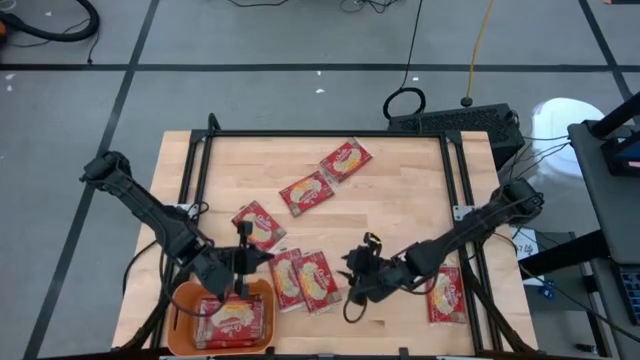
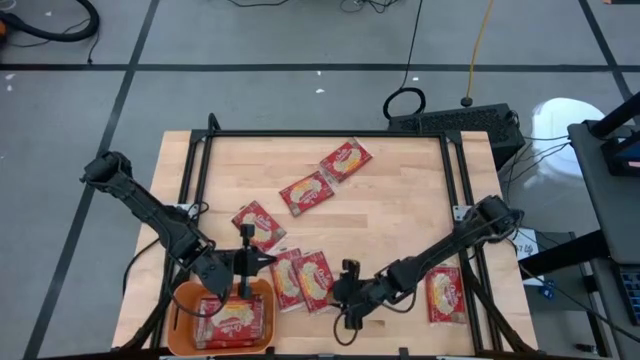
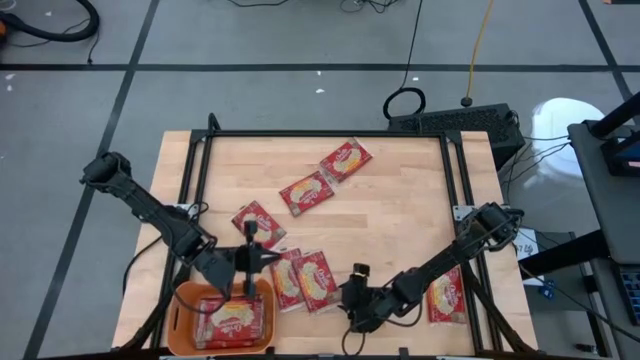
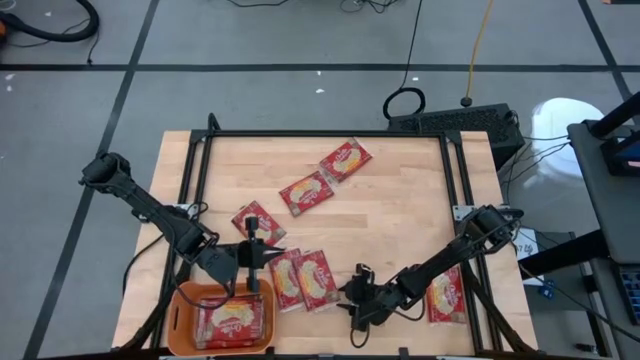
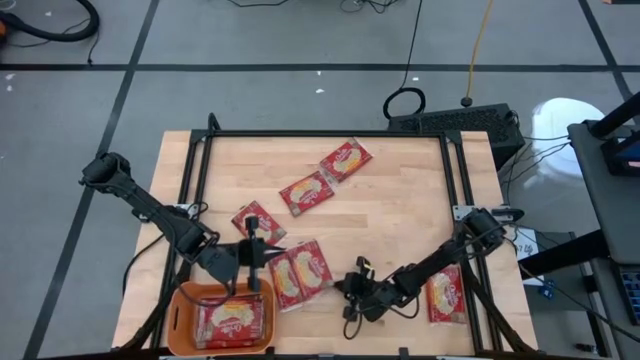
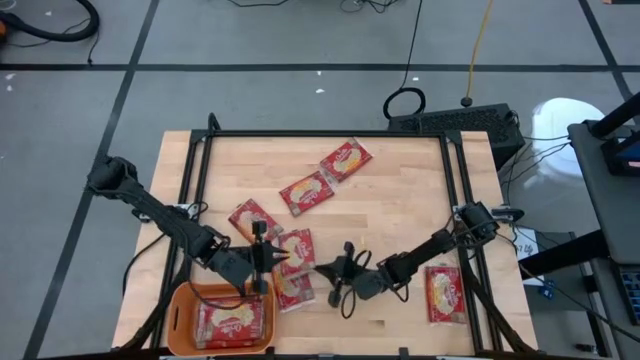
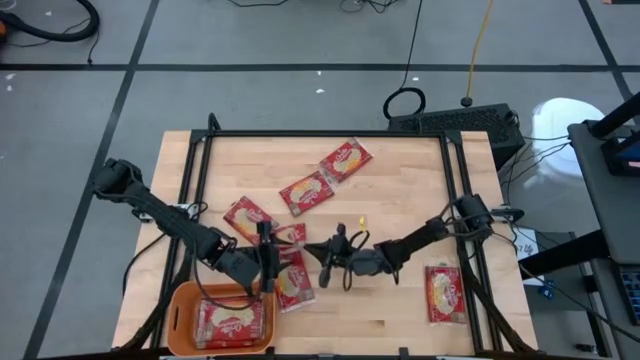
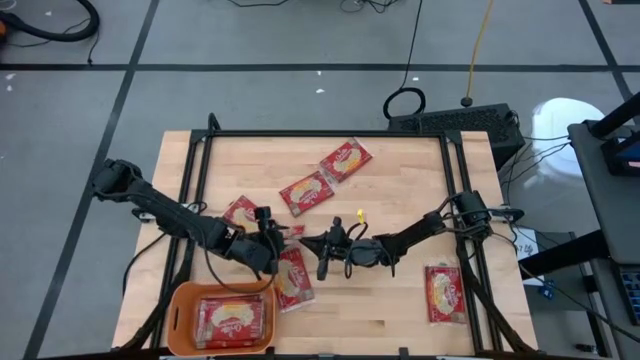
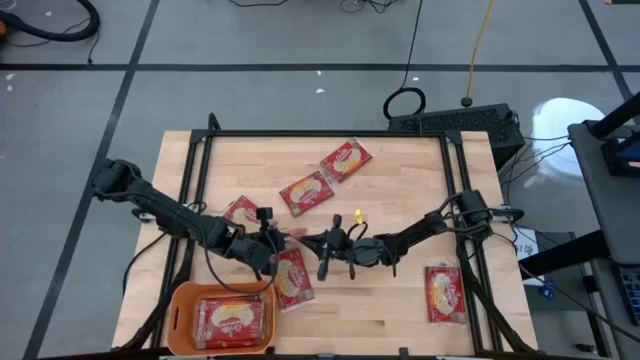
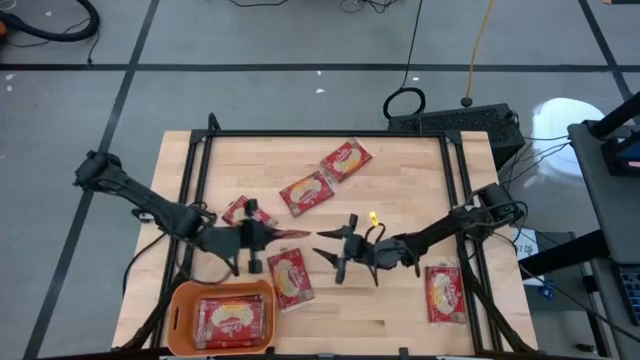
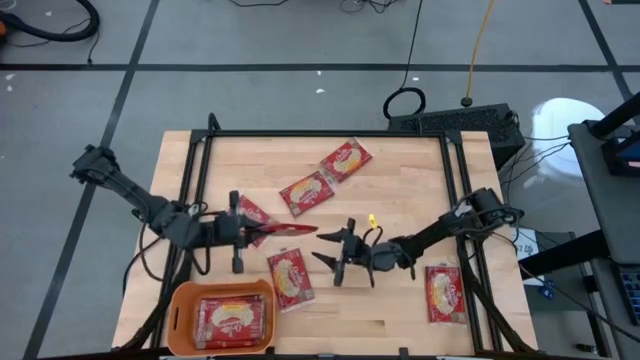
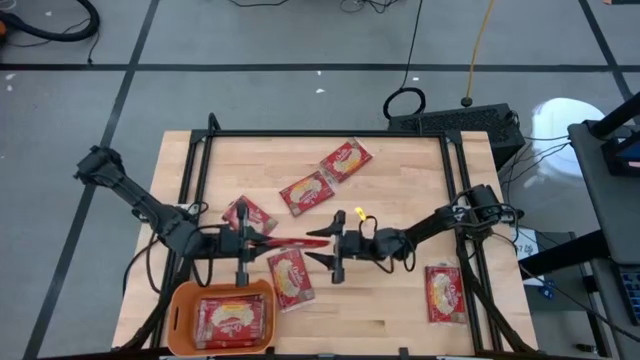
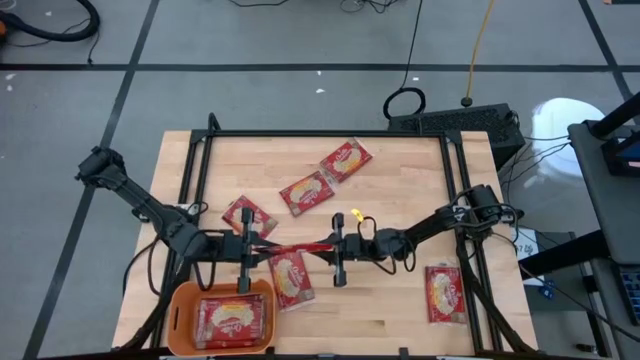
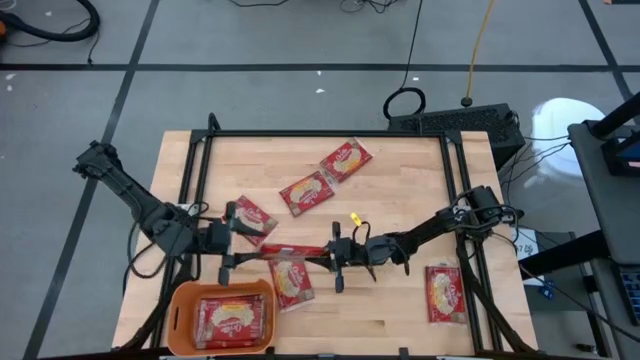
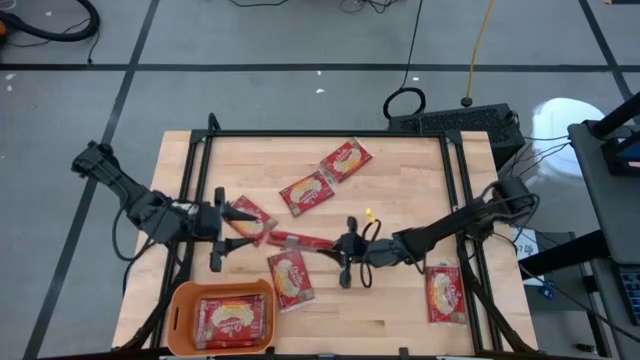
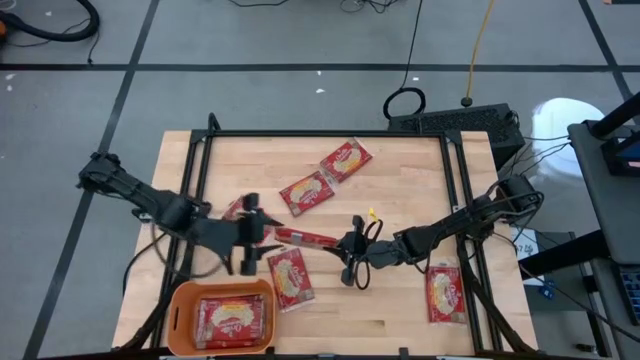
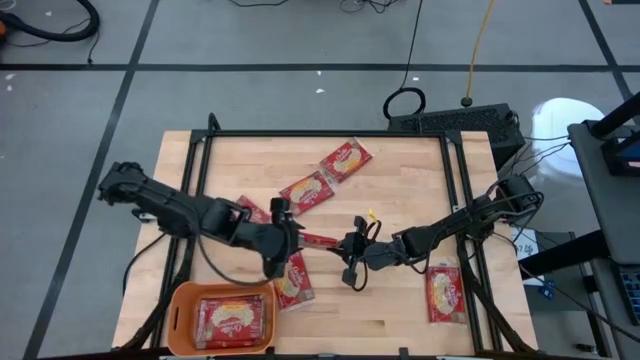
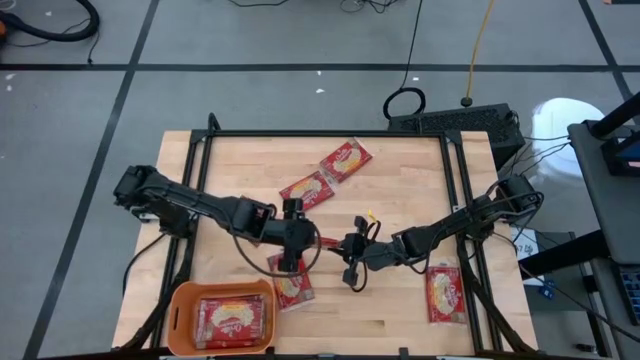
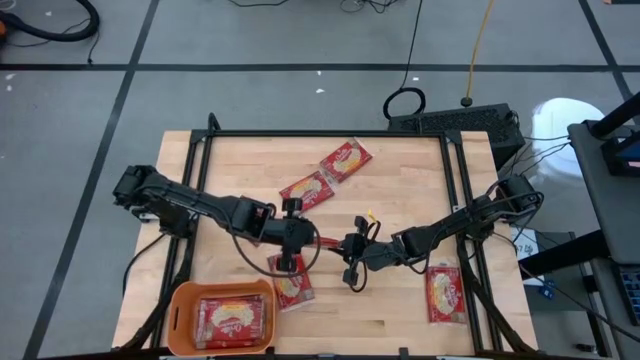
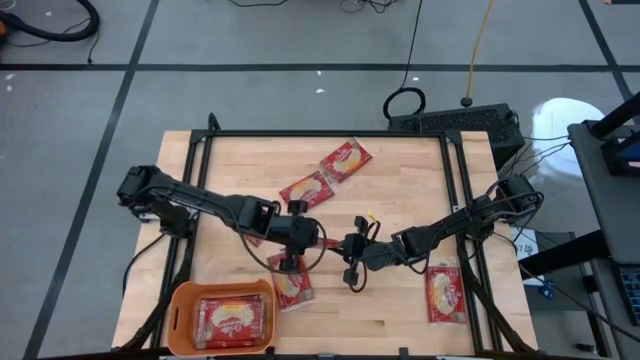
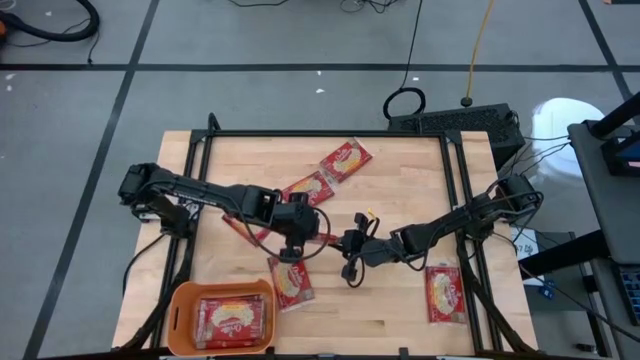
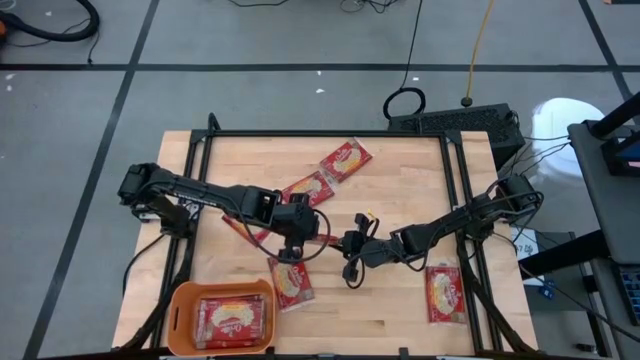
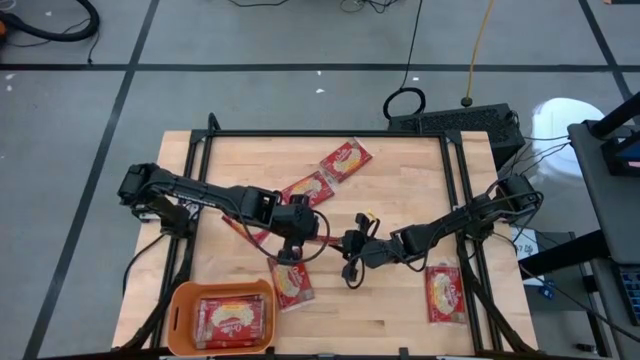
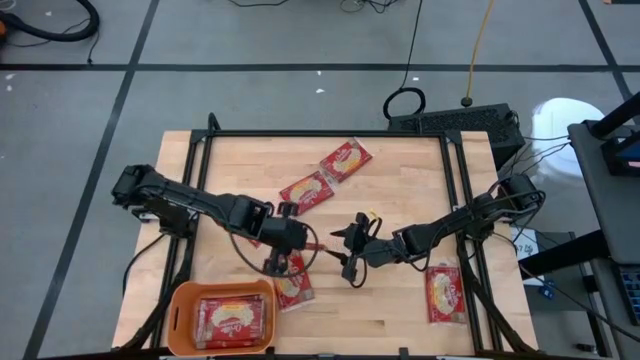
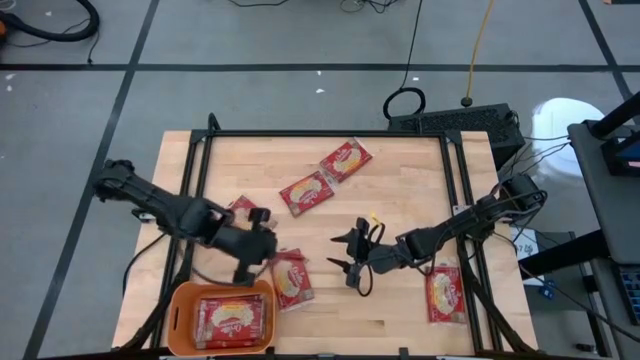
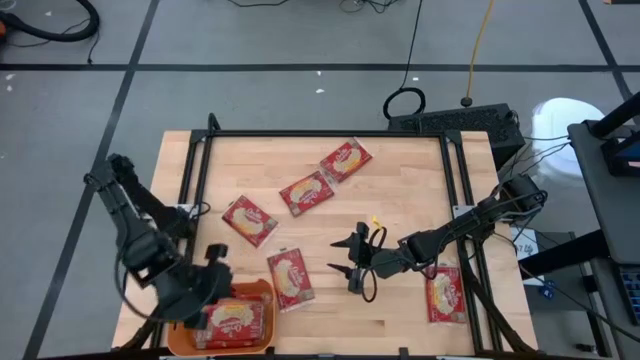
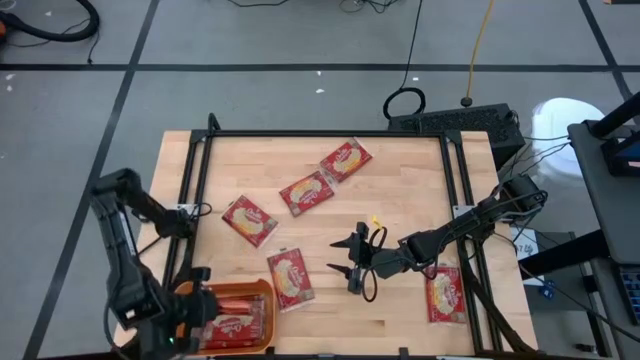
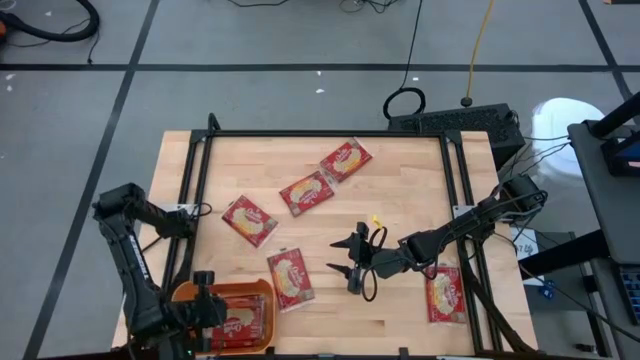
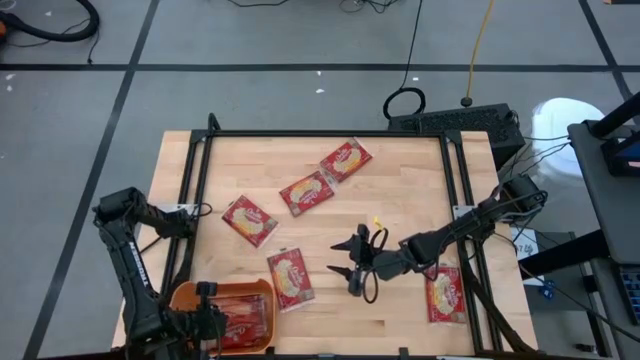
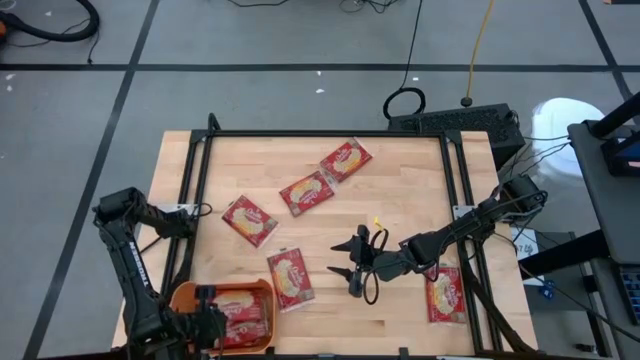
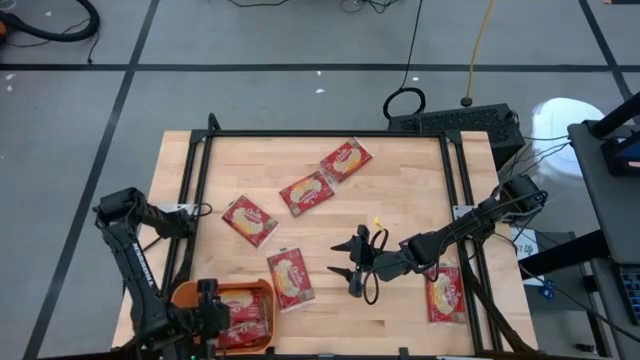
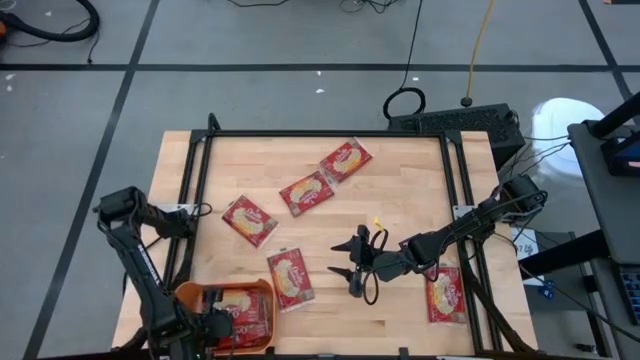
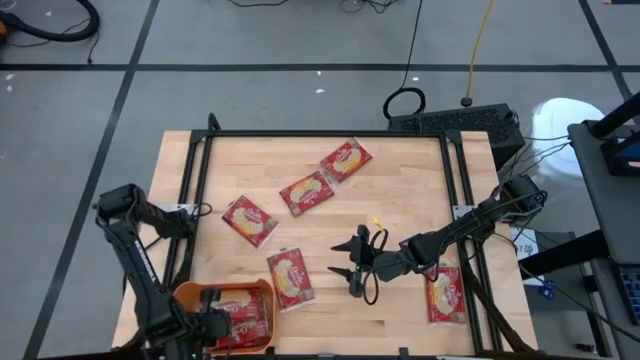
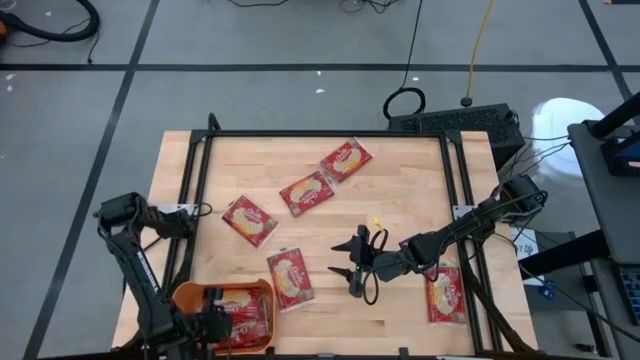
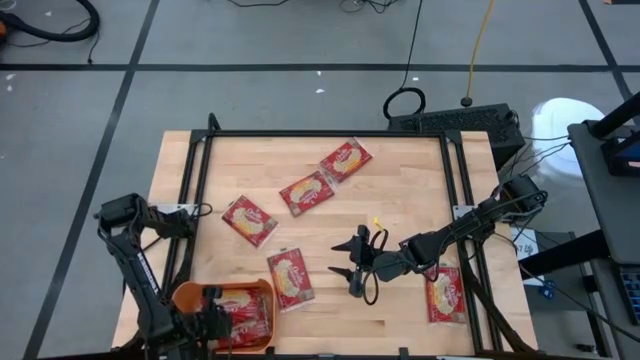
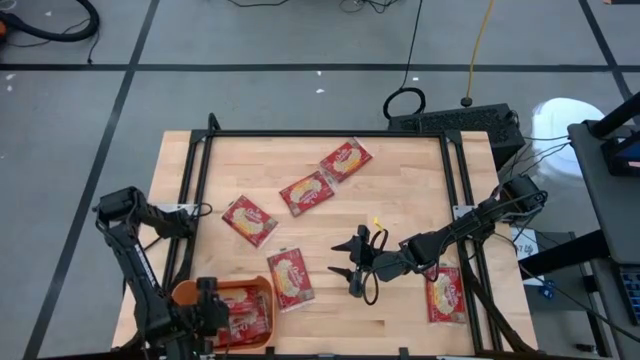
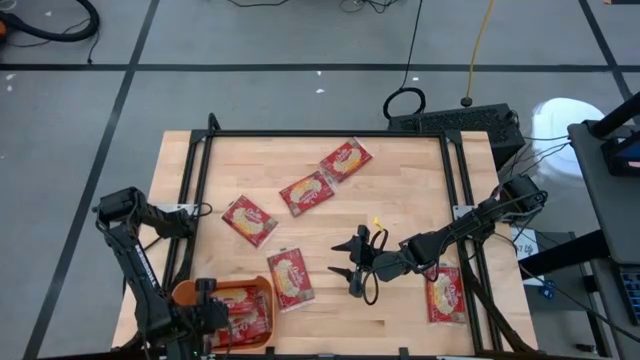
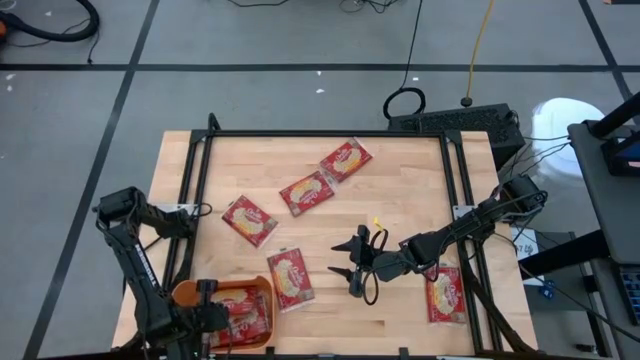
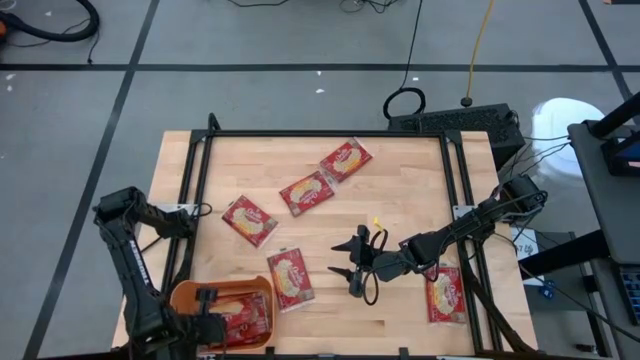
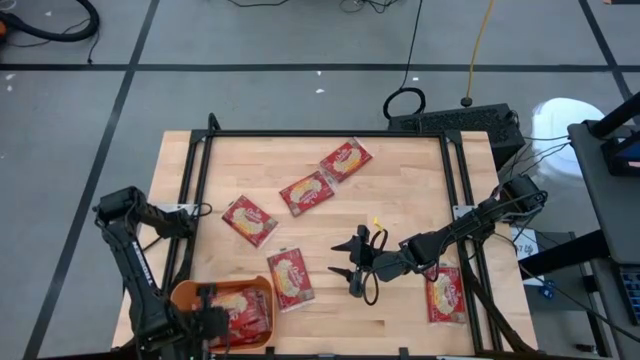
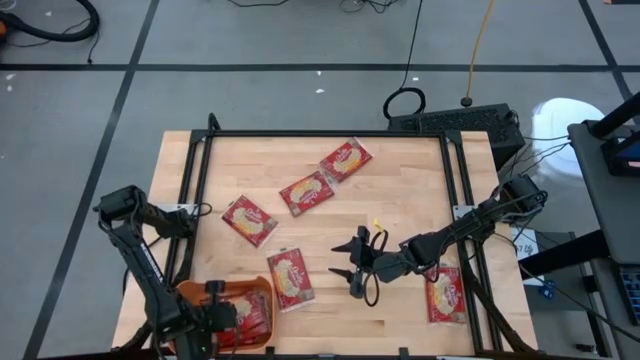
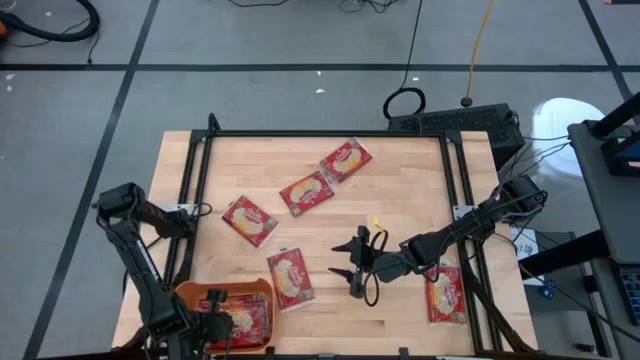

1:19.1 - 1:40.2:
Task: Sort popcorn bags into baskets
Put the popcorn bag into the orange bin

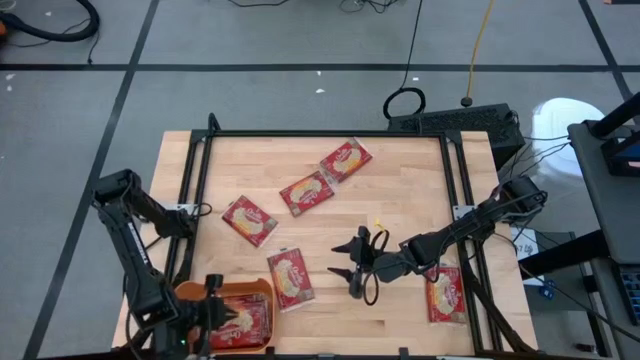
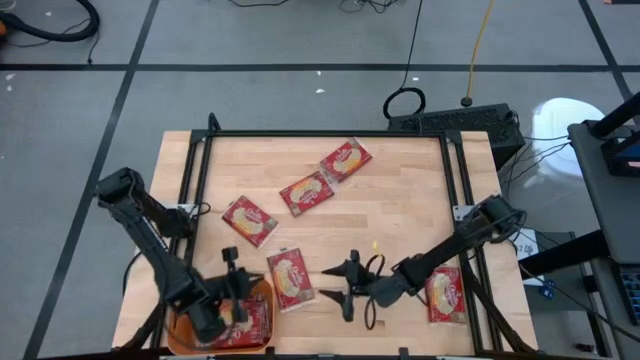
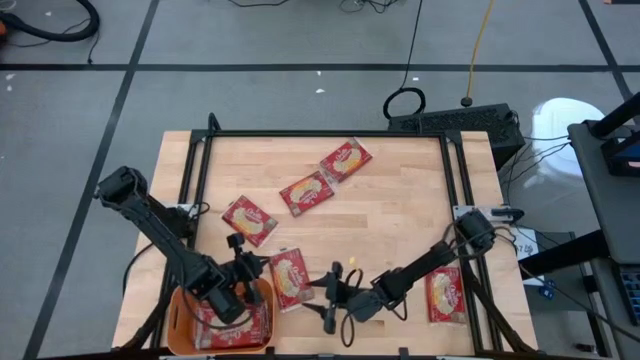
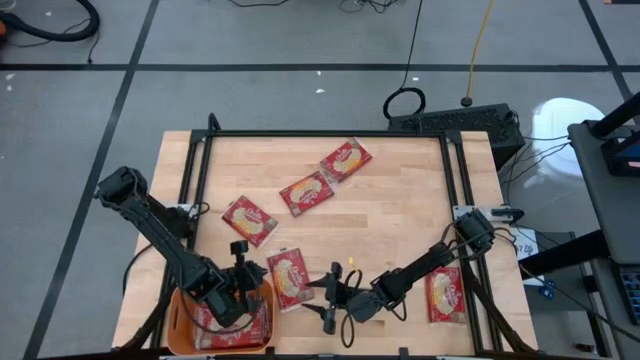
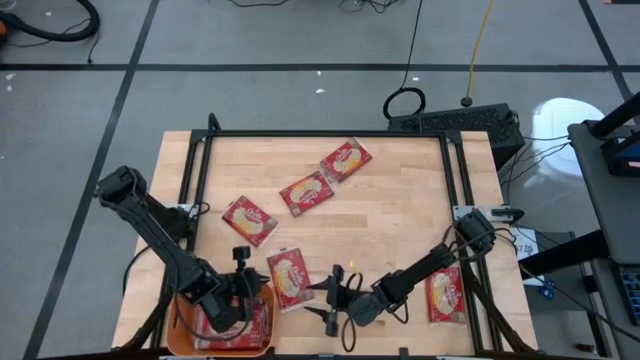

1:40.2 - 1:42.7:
Adjust the orange bin
